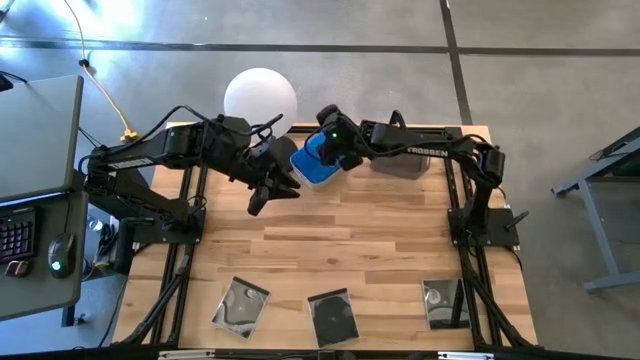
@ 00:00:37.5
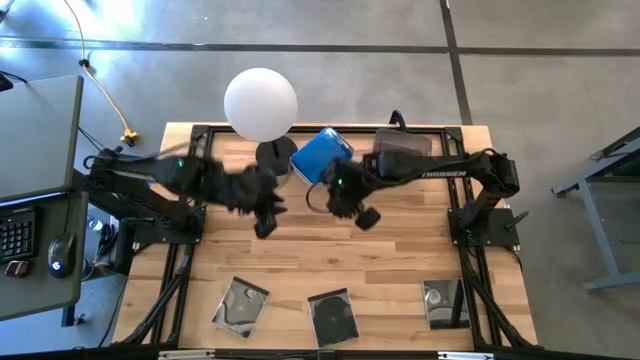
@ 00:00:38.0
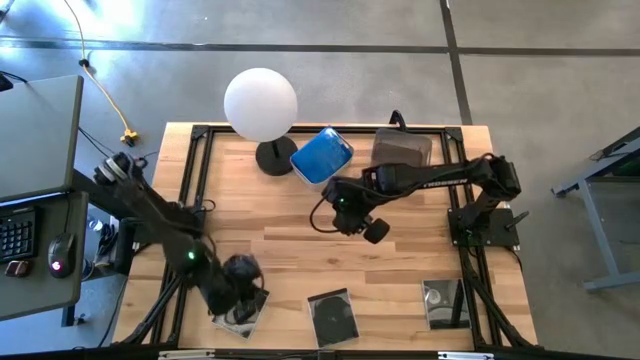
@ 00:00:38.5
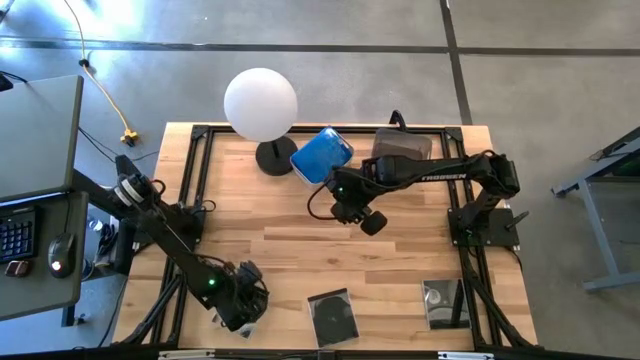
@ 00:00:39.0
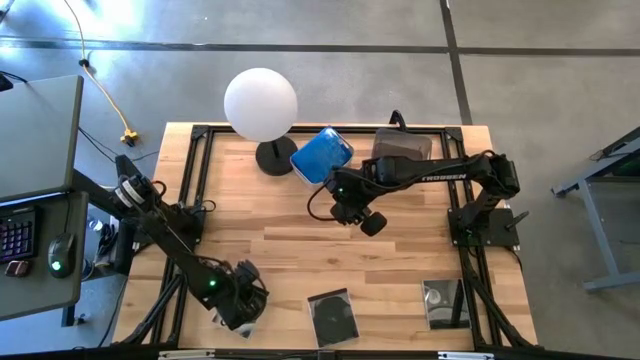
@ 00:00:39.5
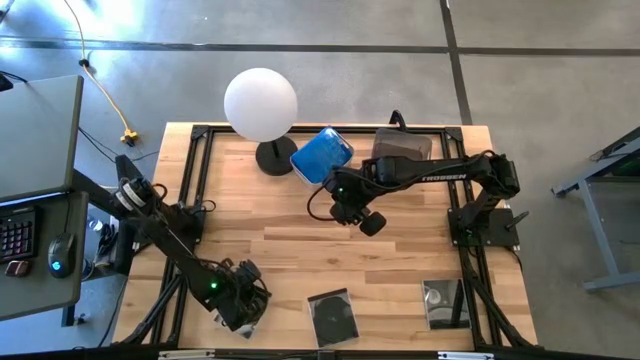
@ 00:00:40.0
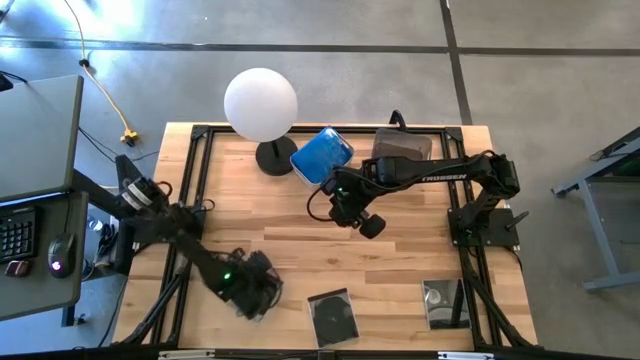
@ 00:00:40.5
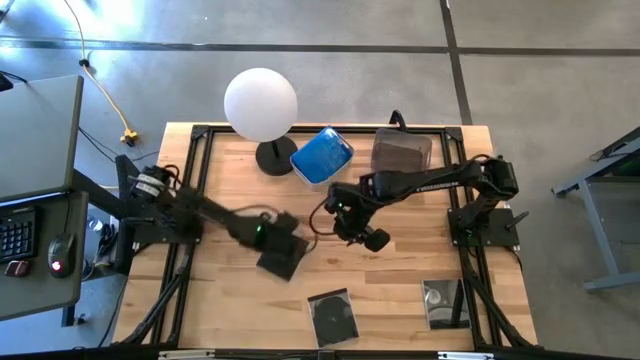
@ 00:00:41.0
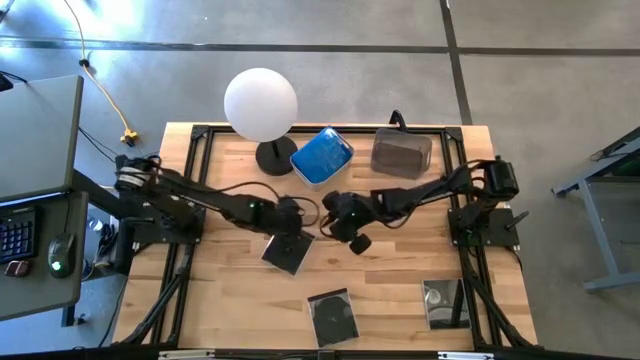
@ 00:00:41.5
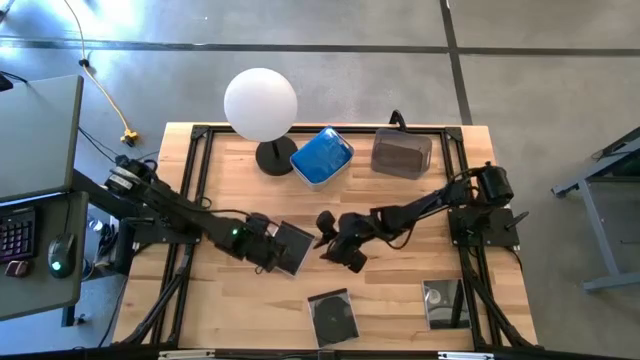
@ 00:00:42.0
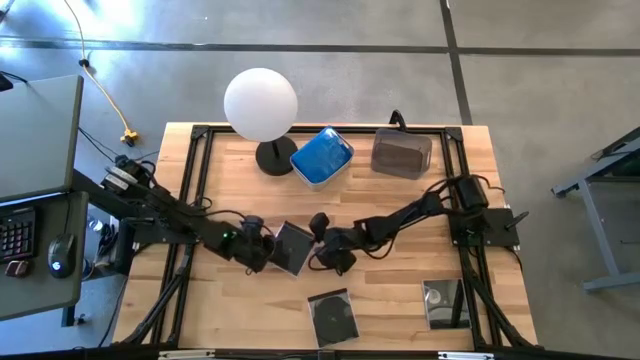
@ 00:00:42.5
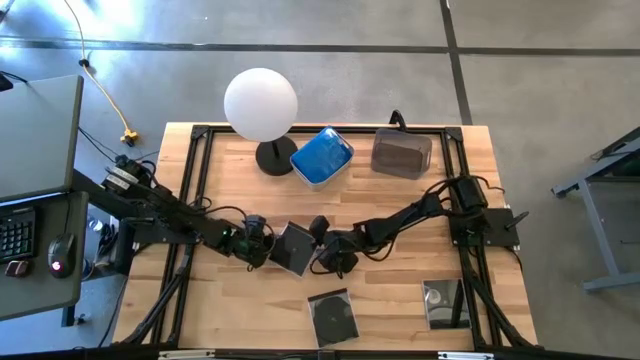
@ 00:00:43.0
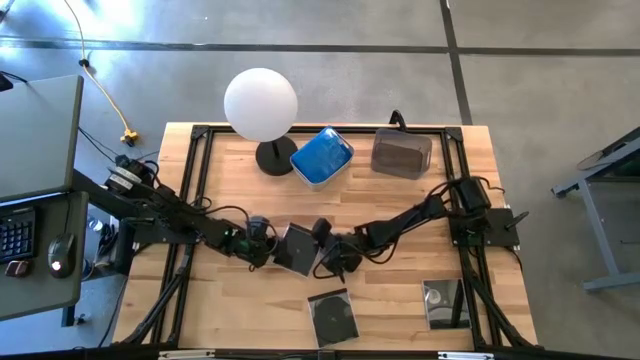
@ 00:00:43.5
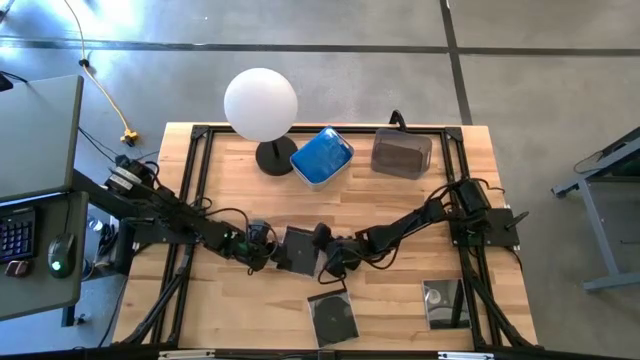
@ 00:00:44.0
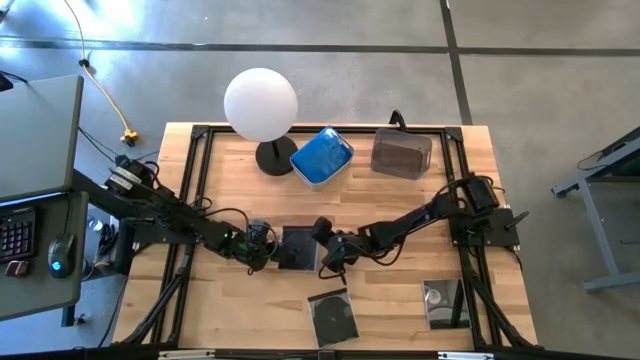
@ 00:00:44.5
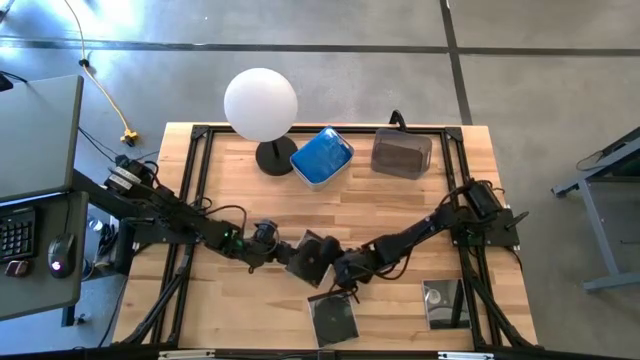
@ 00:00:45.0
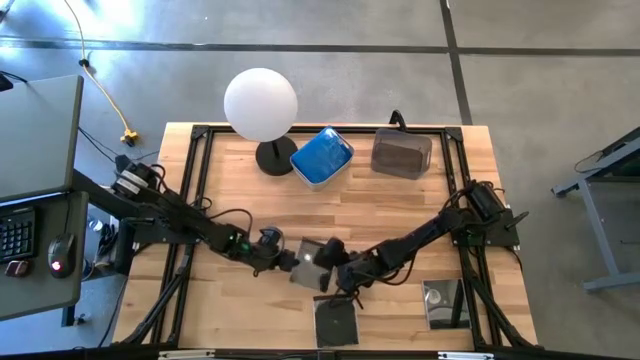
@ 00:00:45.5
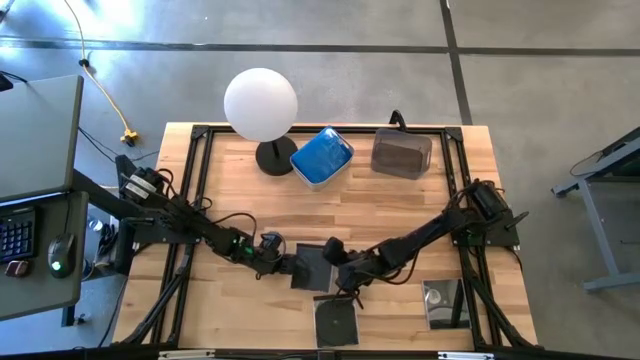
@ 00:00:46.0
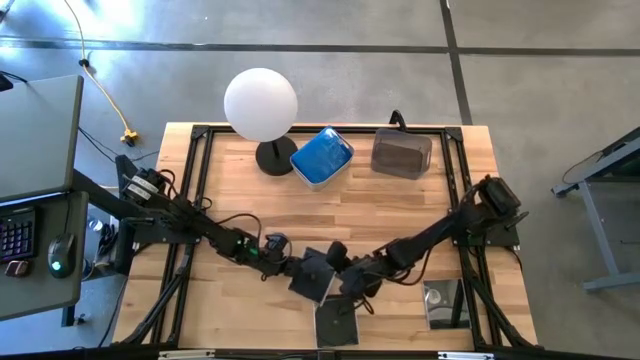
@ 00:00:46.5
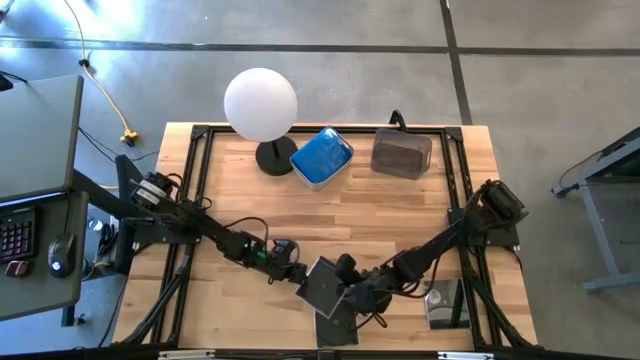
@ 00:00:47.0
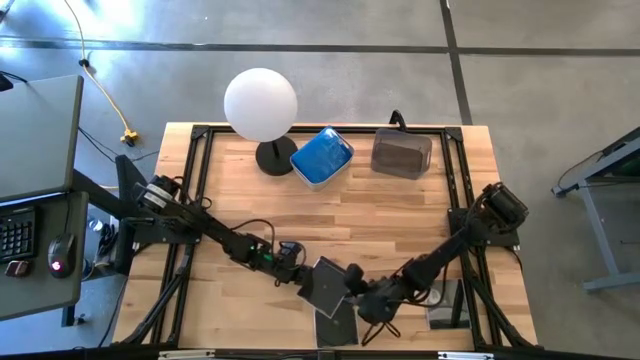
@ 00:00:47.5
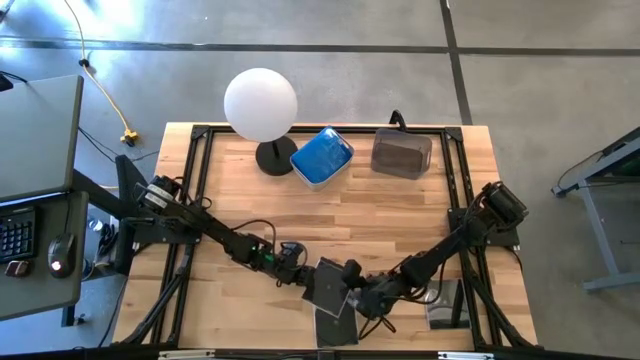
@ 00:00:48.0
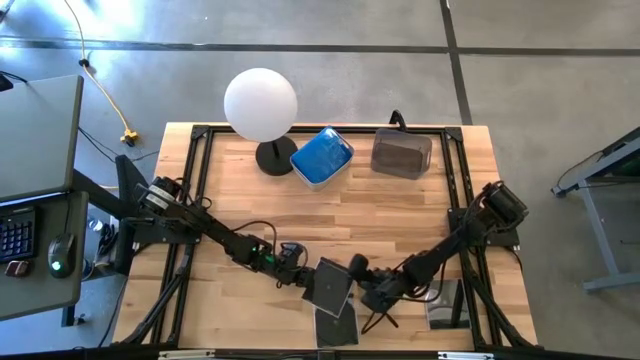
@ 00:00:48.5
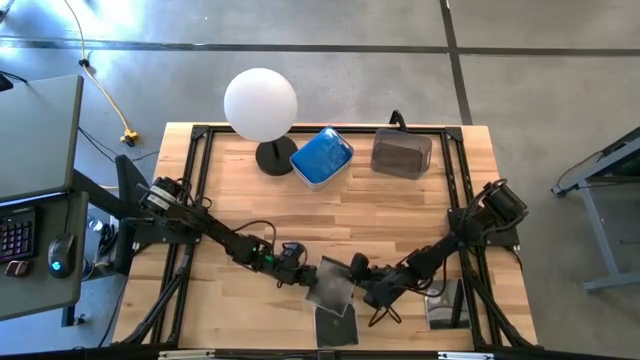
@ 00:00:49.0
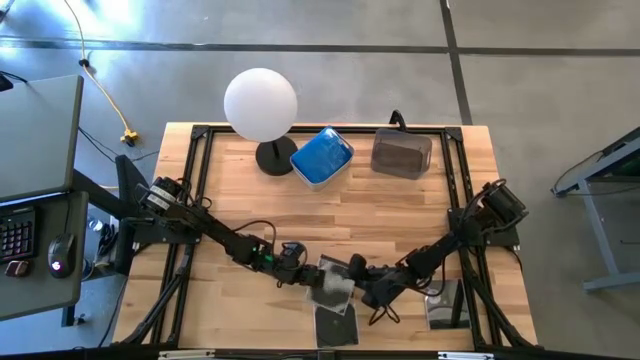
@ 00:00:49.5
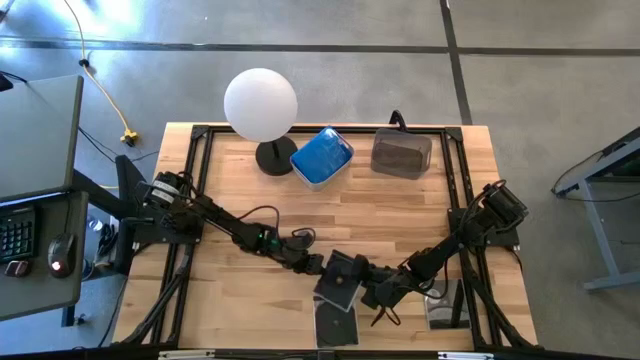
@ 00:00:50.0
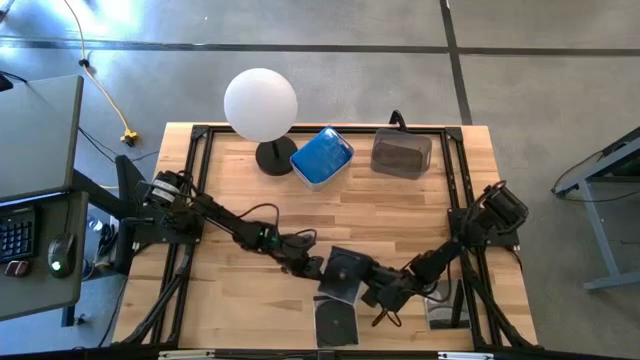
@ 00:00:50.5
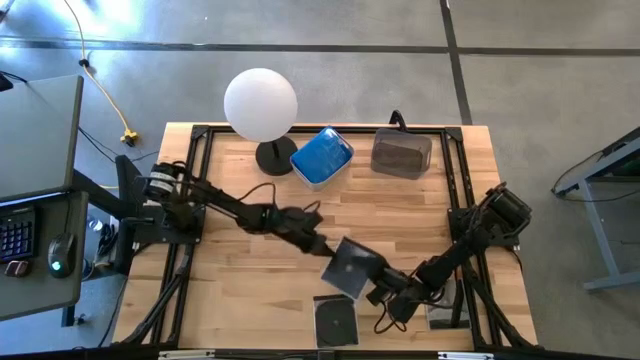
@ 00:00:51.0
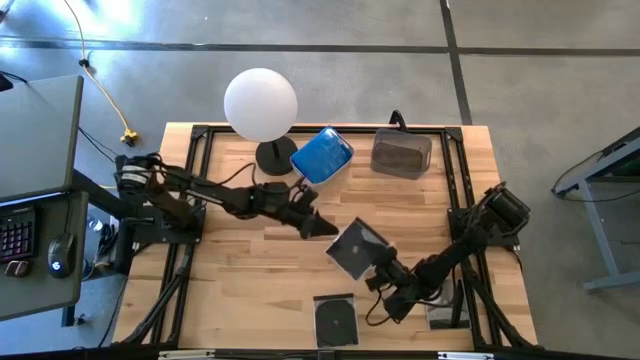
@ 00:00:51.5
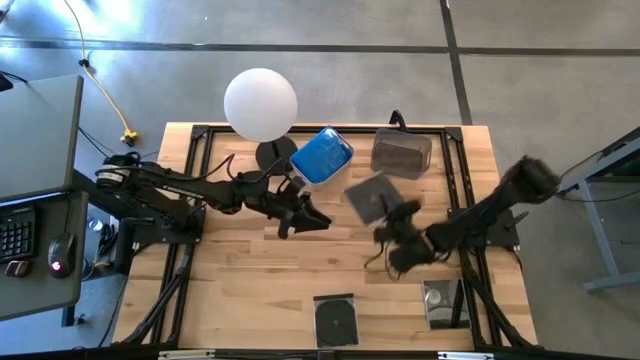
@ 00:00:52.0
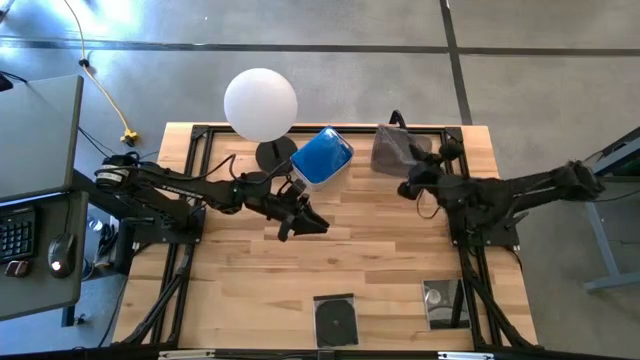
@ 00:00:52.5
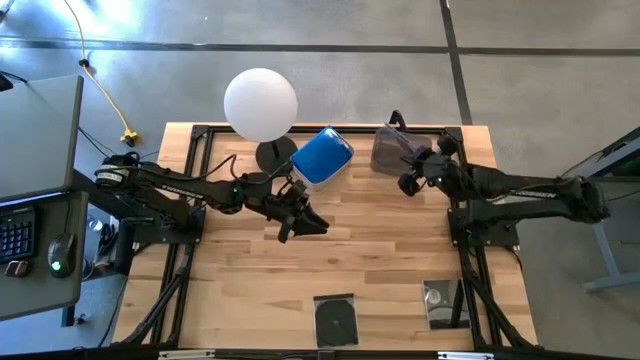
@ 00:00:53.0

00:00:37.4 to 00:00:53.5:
Task: Pick & place jewel cases by type
Put the left black CD case into the black bin

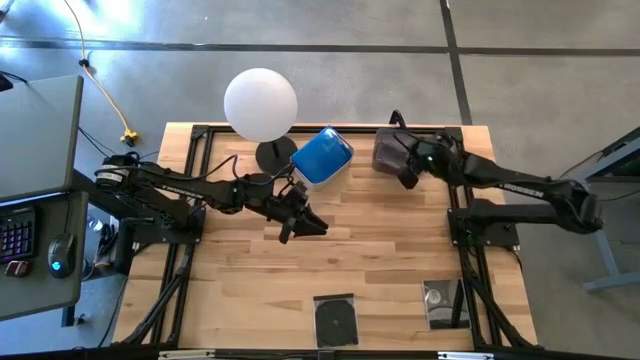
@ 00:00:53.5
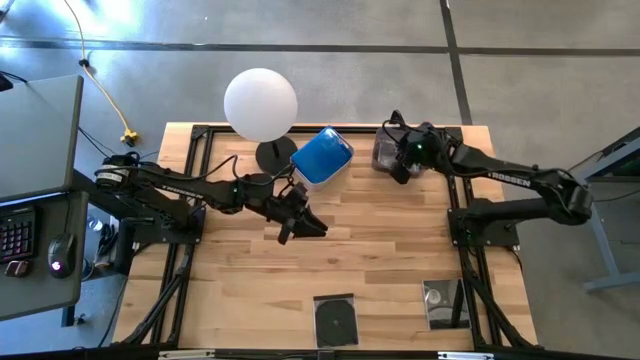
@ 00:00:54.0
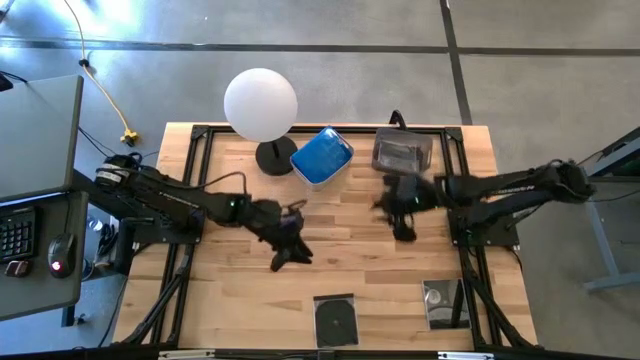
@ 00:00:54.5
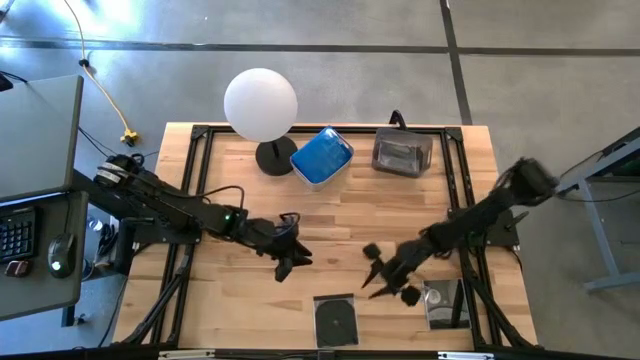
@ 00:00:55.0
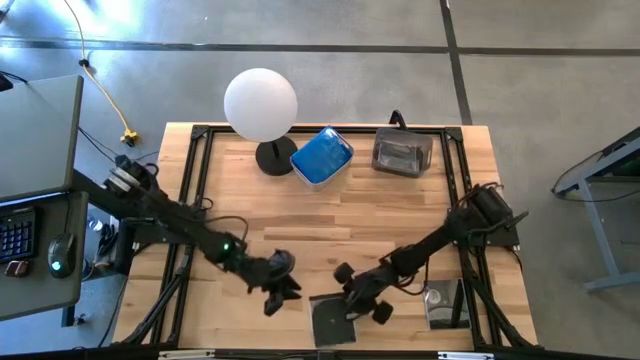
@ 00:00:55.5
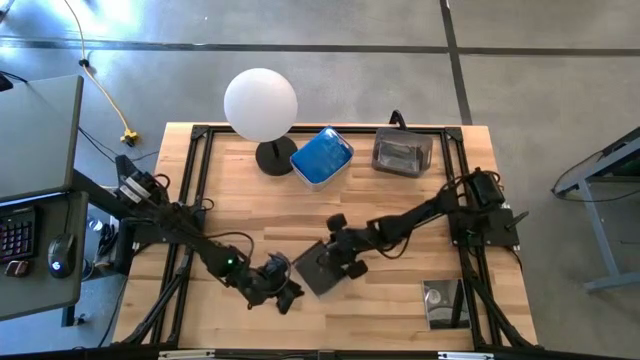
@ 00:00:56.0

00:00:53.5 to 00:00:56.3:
Move the left black CD case to the center of the table

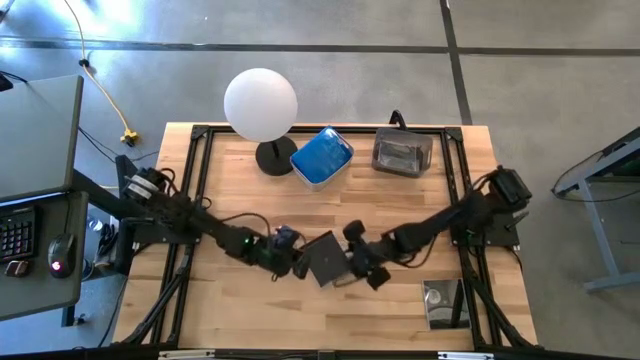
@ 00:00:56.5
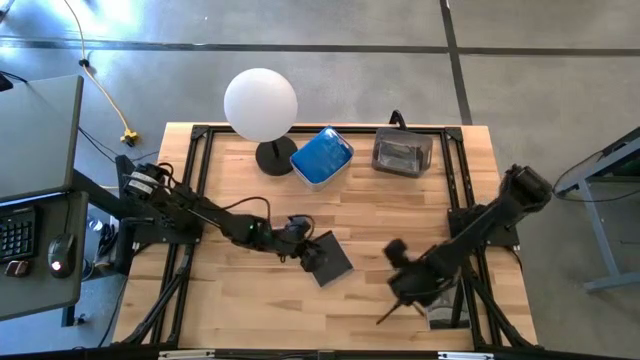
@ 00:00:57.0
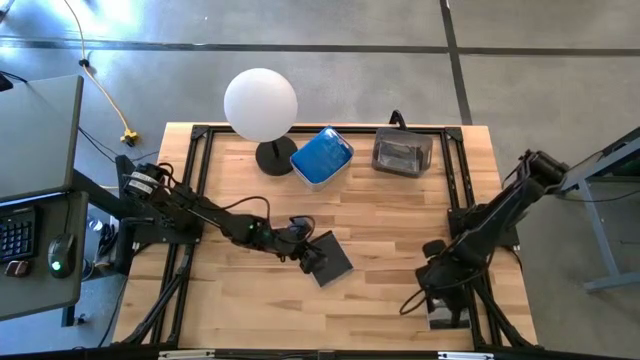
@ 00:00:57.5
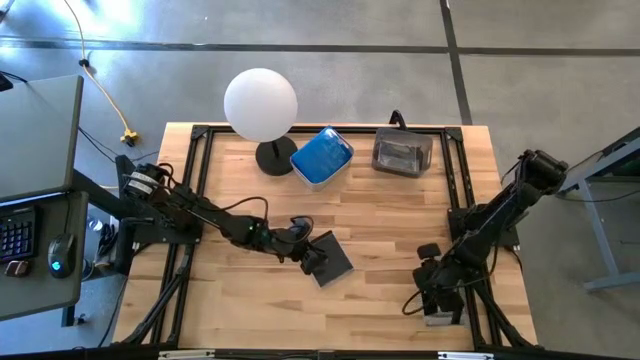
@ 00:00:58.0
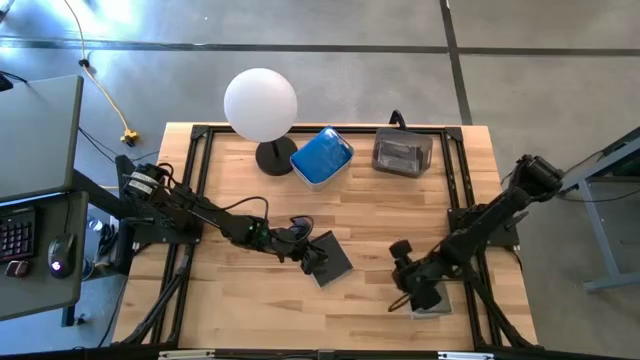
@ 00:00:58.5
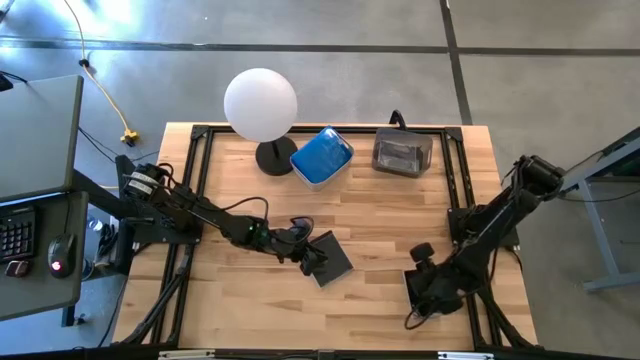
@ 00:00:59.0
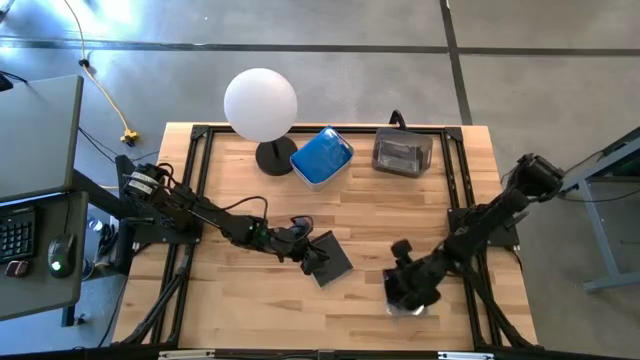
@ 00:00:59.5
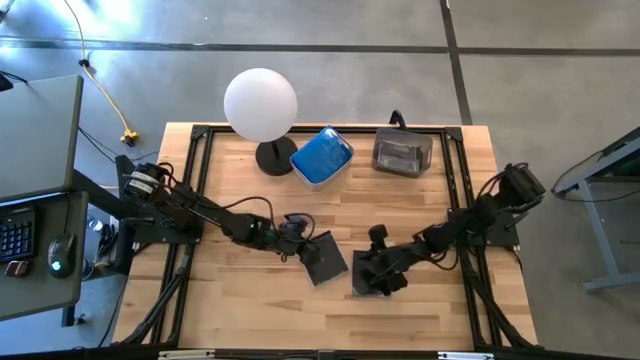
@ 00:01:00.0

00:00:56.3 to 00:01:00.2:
Move the right black CD case to the center of the table
